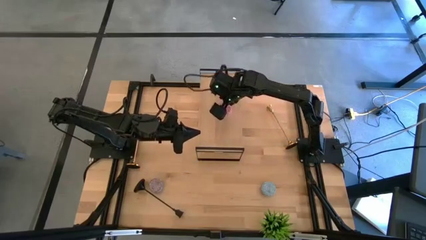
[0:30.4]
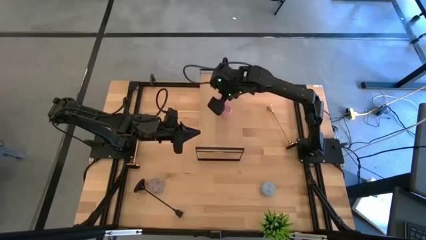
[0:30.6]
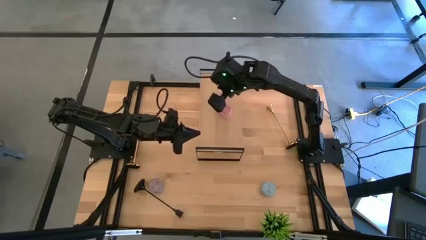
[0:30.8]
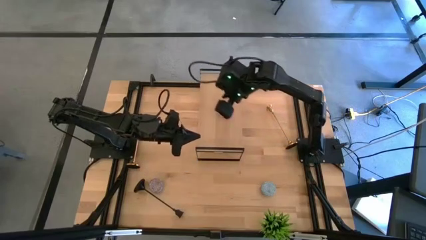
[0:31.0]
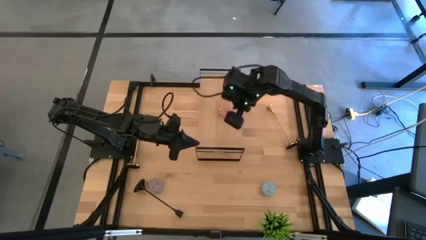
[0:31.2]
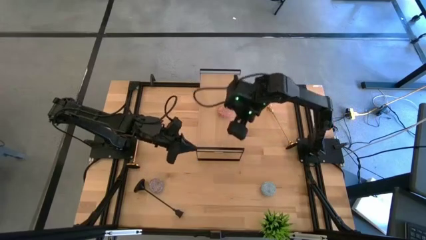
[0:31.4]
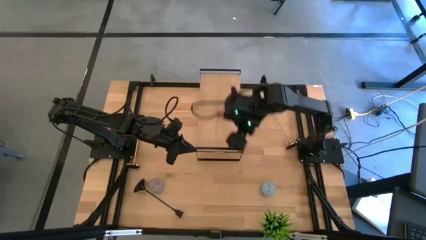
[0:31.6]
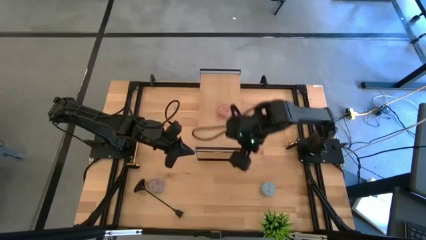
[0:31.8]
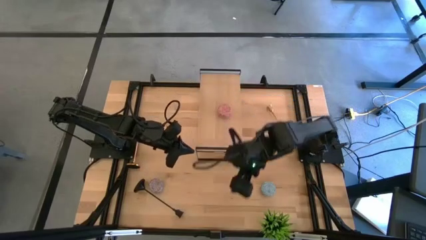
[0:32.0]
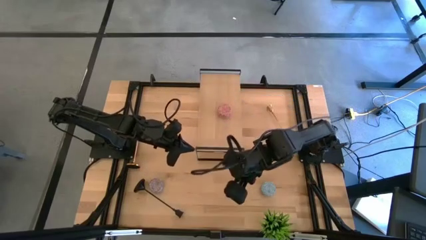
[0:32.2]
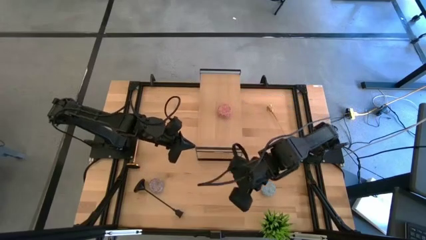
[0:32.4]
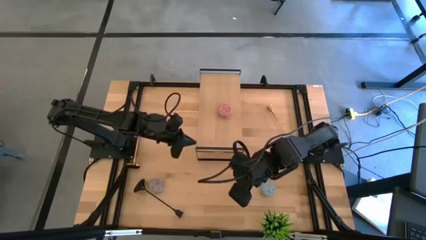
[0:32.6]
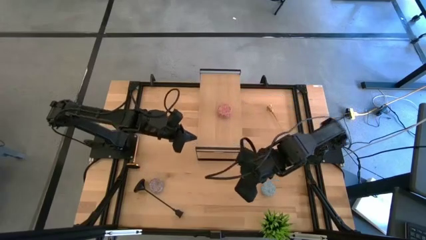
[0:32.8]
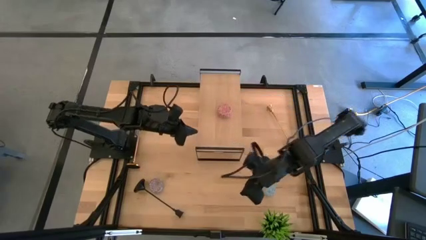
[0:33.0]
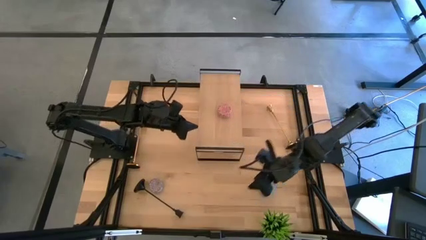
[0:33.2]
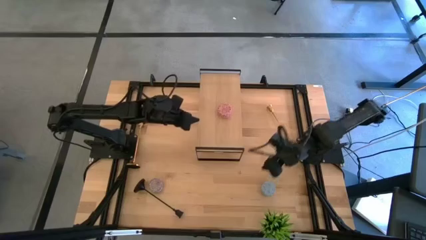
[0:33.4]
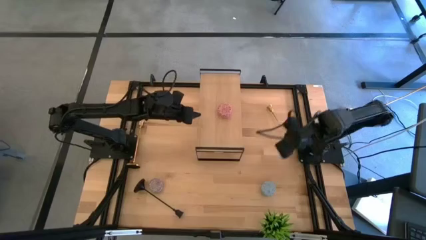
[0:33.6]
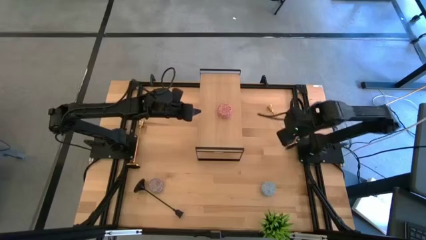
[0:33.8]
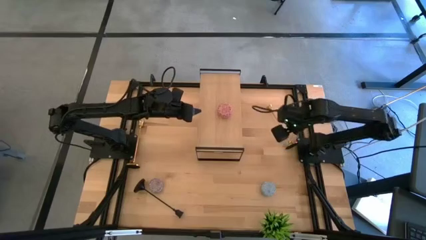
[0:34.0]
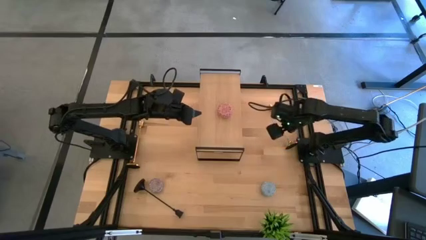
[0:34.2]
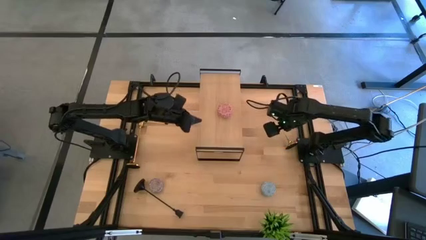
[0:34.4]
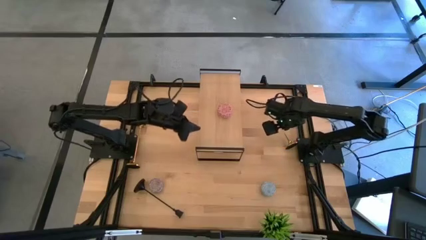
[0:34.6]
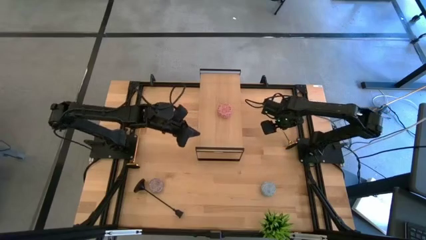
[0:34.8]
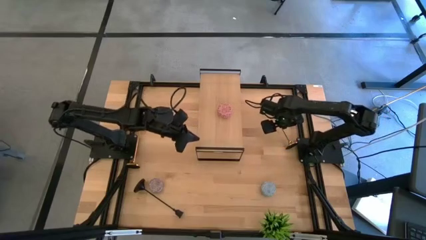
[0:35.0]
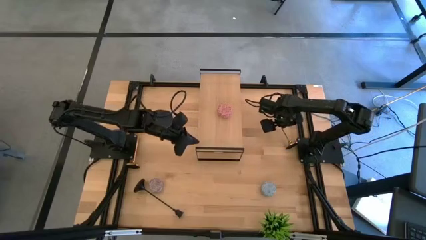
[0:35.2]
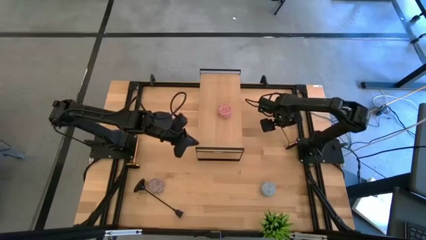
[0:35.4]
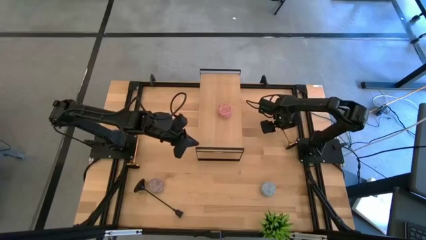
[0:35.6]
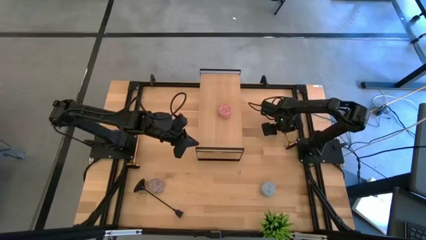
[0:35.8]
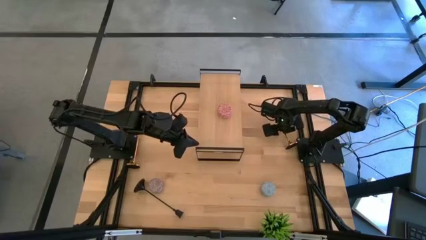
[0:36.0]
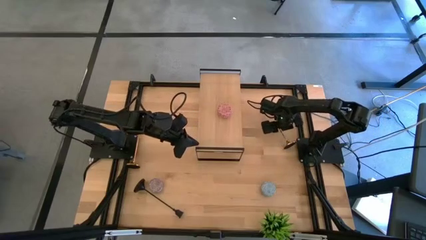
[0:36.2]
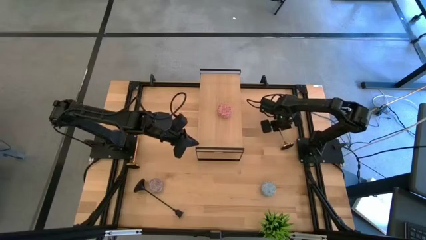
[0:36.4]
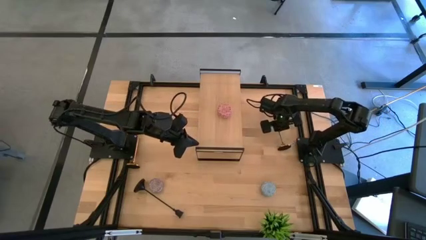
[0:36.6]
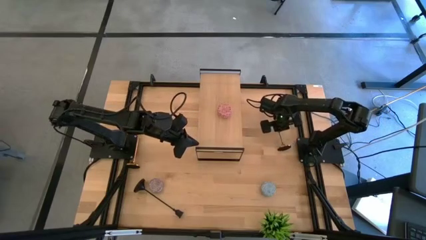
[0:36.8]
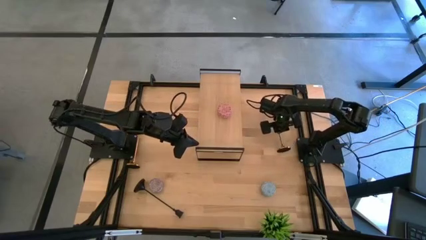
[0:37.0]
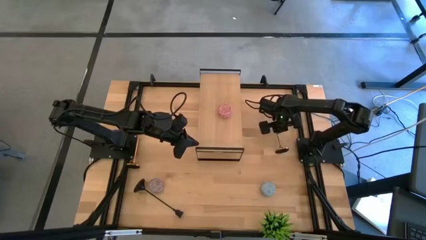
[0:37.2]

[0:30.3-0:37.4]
Task: Pick & Place candle stick holders
Put the gold candle holder on the shelf

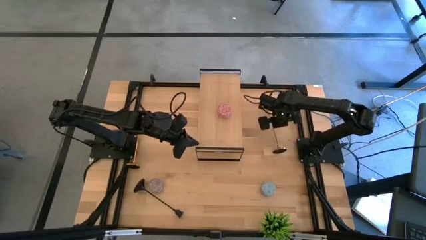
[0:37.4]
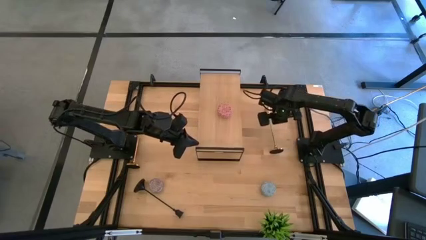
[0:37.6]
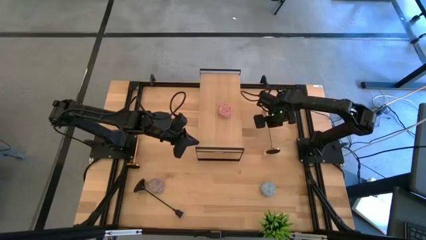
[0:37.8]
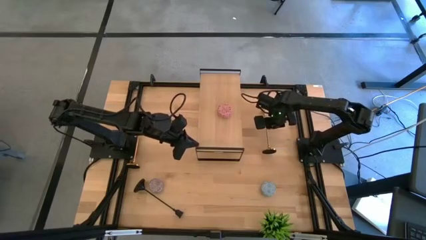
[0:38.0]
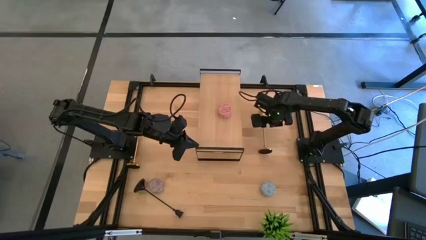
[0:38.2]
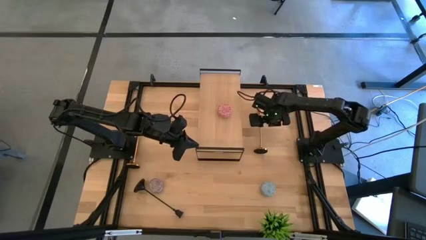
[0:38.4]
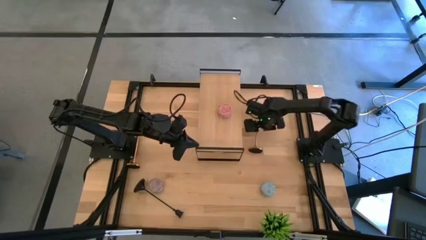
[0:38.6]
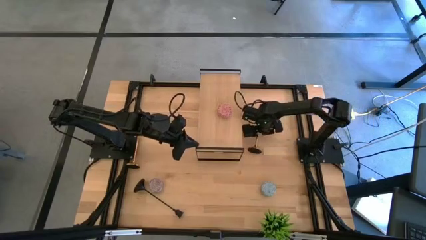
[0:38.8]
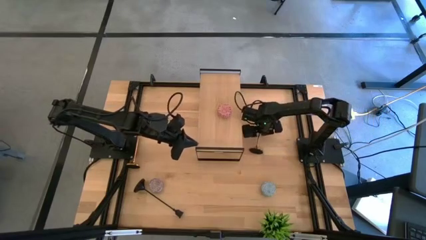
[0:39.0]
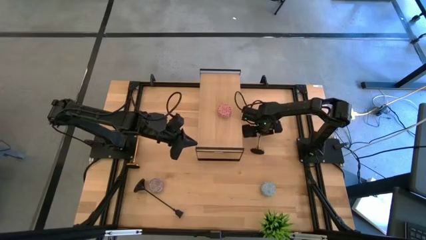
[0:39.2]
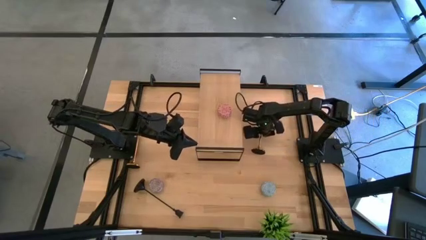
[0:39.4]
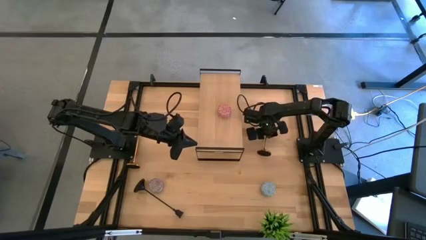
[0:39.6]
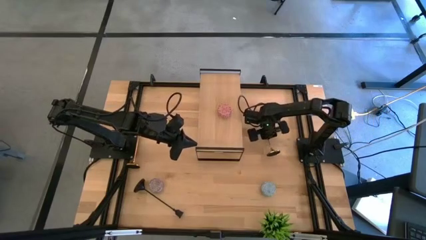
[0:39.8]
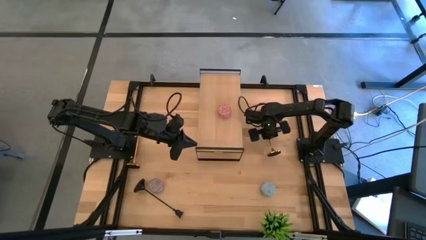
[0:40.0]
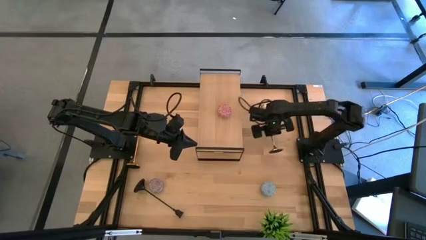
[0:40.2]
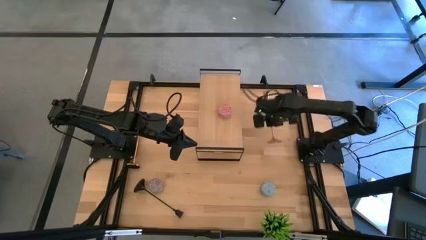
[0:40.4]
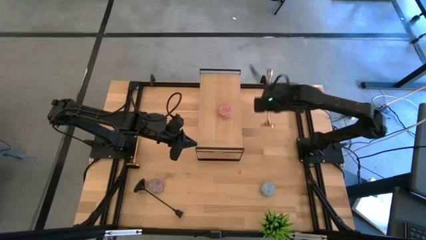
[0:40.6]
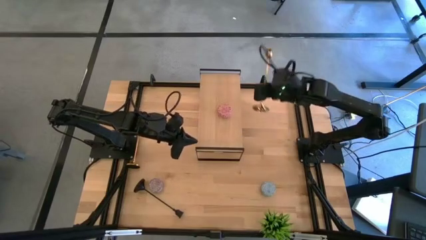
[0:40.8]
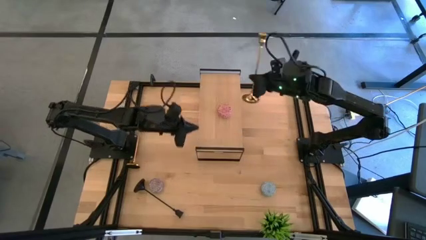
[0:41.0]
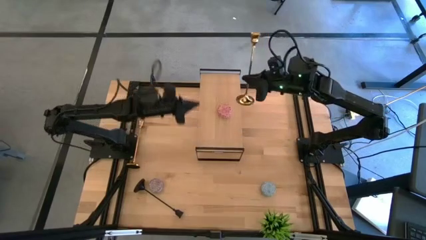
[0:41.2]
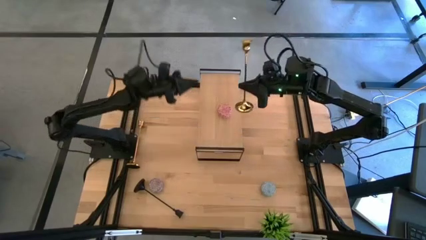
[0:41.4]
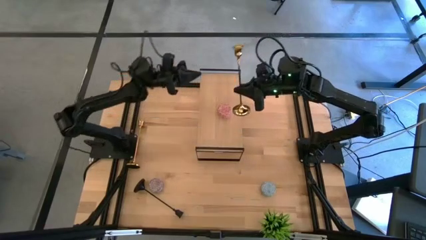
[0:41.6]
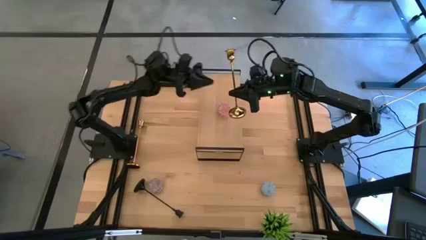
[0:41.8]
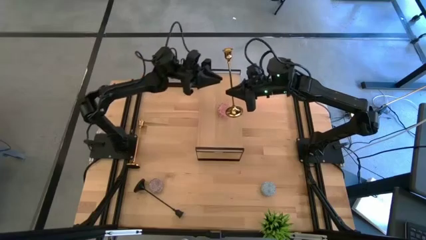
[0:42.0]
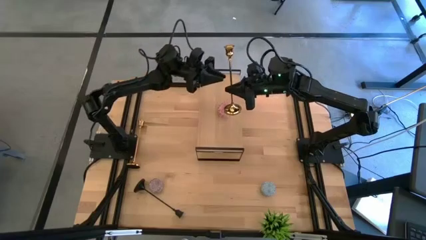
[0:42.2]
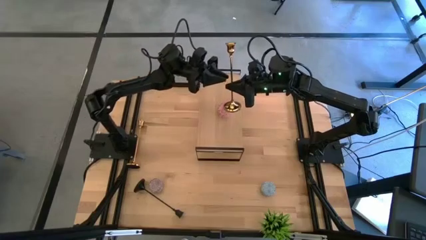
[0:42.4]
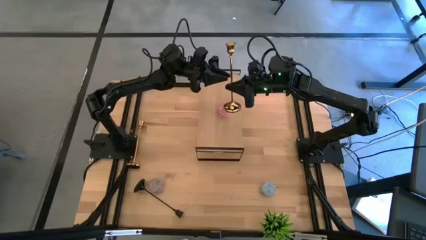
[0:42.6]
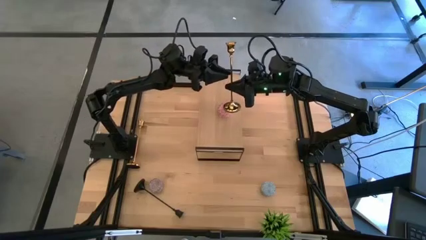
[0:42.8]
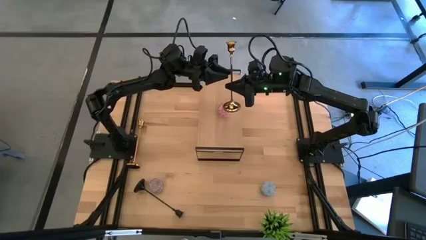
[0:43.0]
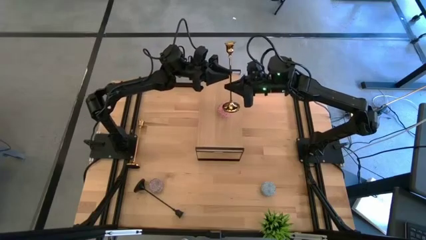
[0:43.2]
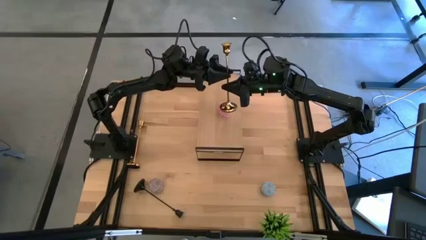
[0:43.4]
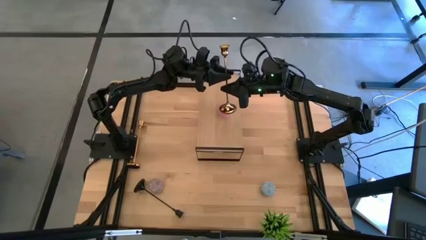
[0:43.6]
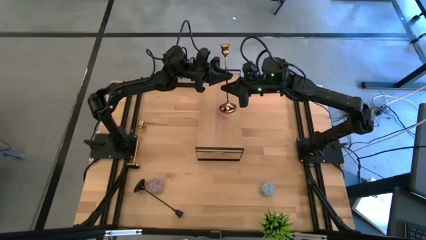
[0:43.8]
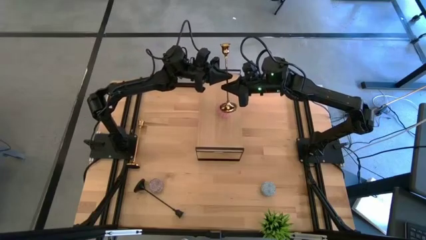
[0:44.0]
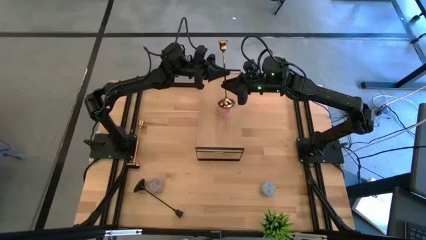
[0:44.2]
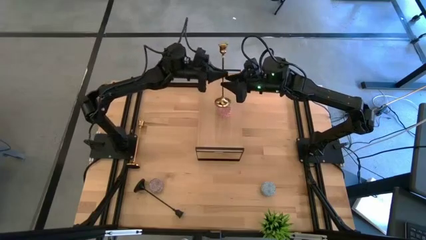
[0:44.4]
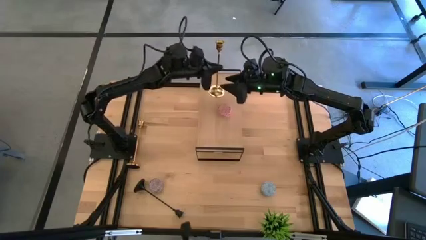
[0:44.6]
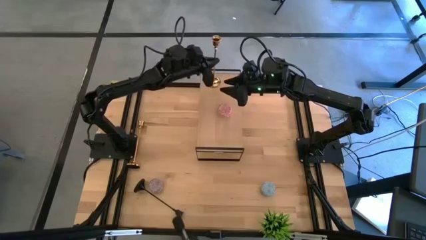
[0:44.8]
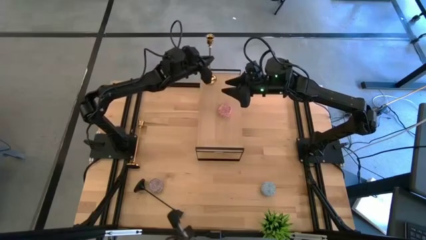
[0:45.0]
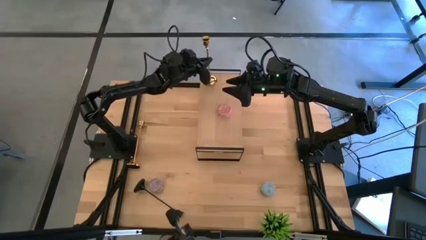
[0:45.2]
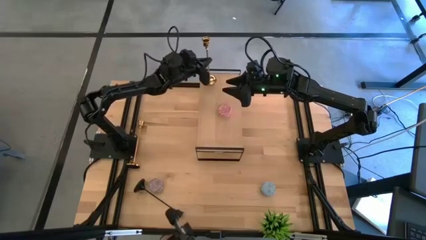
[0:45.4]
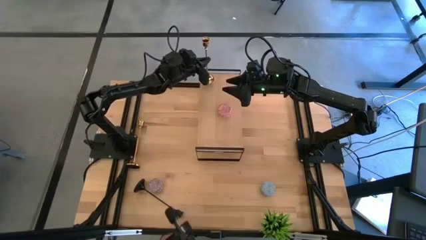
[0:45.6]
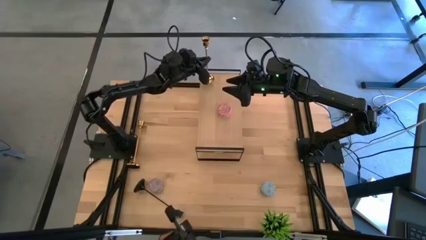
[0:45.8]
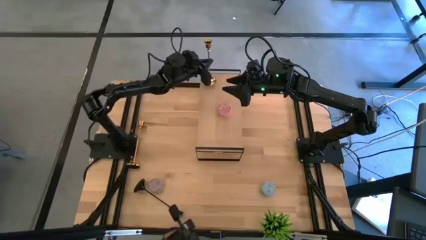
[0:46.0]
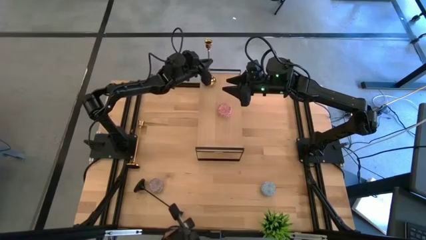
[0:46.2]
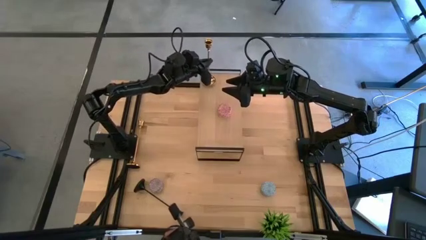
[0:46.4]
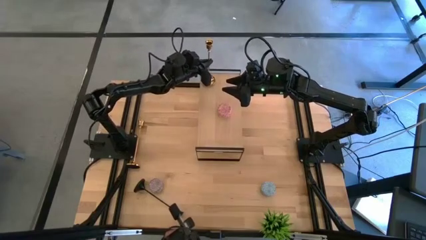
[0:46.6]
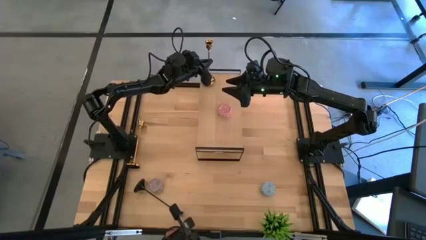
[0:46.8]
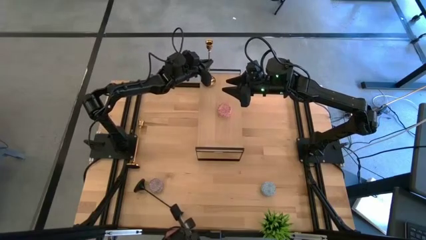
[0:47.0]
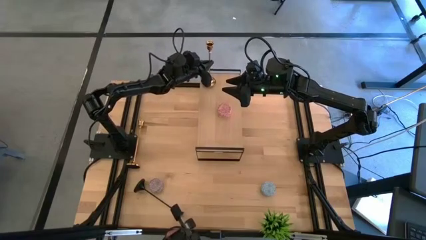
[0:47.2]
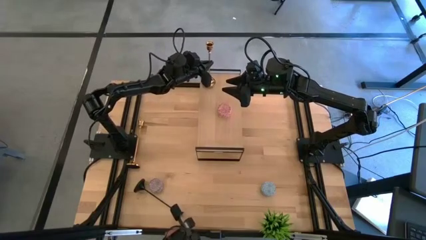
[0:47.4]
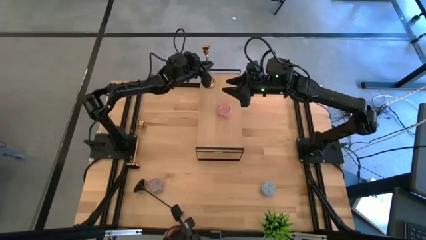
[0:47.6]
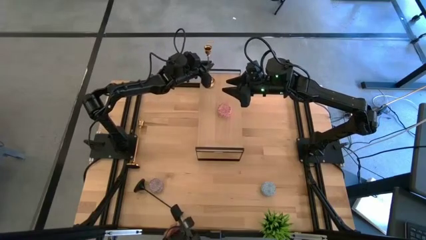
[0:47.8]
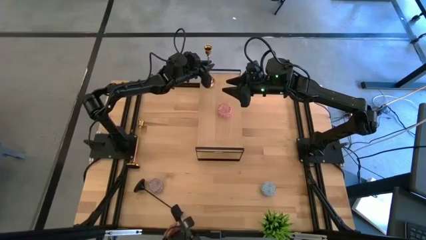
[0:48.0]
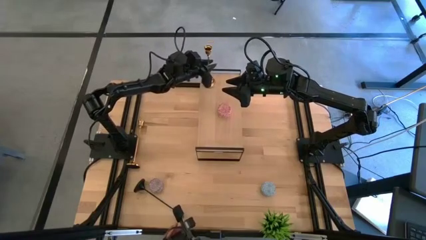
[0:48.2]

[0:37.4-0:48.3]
Put the gold candle holder on the shelf
